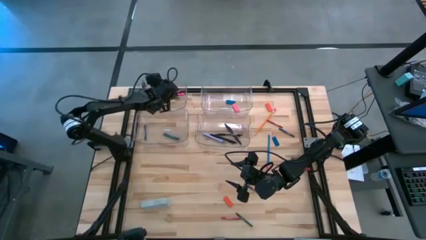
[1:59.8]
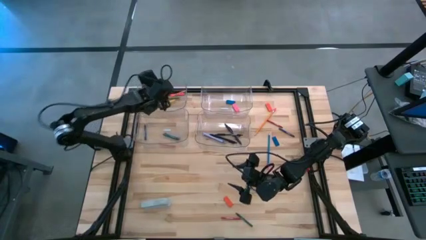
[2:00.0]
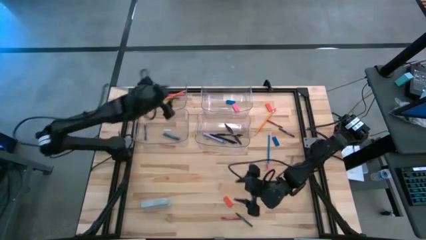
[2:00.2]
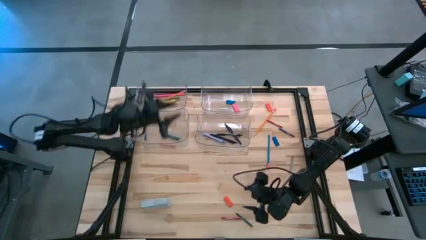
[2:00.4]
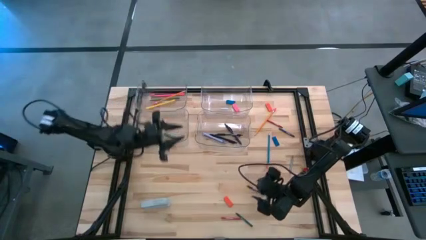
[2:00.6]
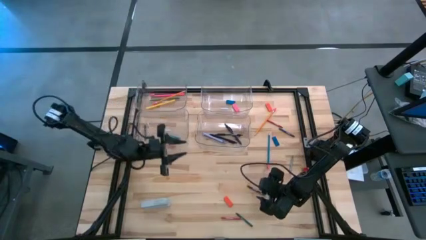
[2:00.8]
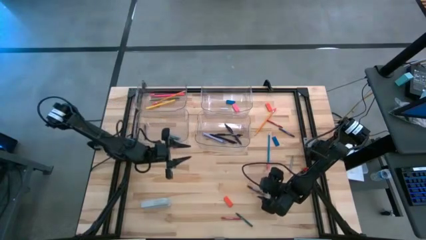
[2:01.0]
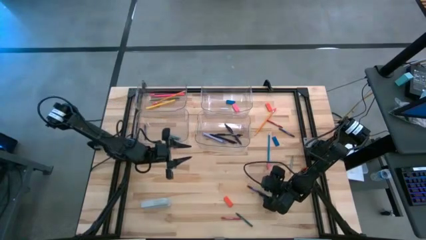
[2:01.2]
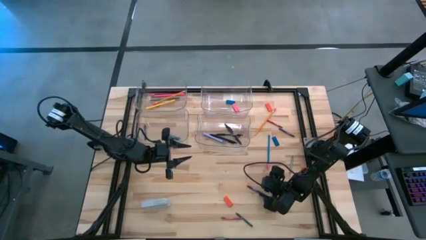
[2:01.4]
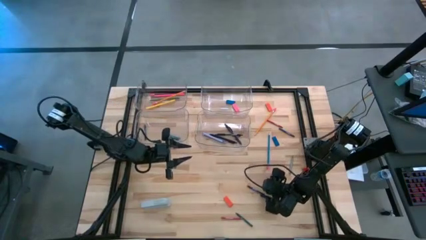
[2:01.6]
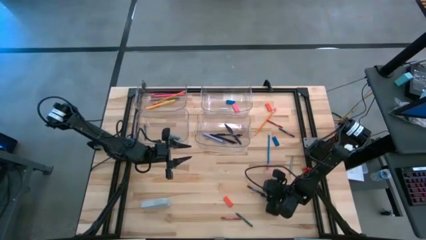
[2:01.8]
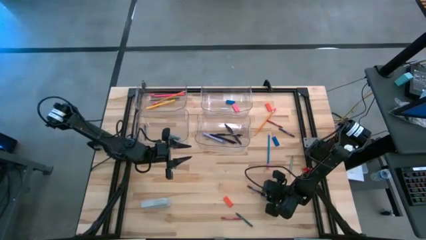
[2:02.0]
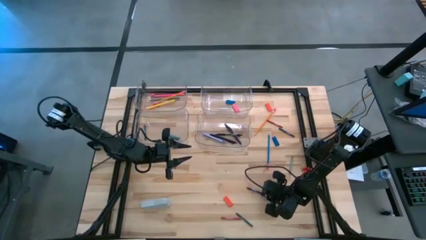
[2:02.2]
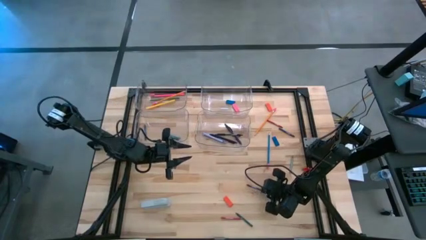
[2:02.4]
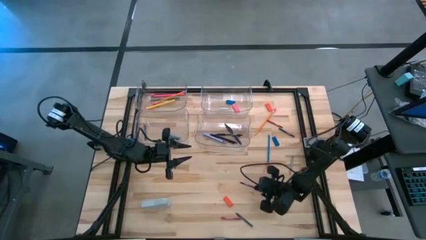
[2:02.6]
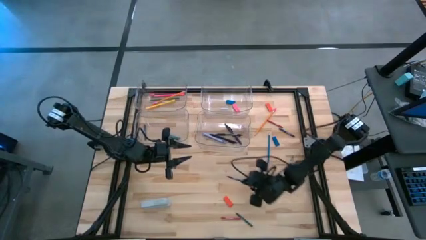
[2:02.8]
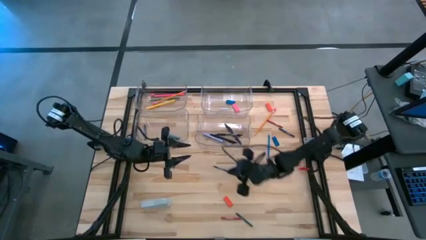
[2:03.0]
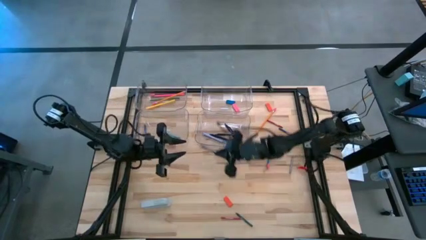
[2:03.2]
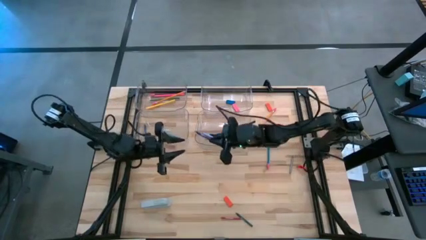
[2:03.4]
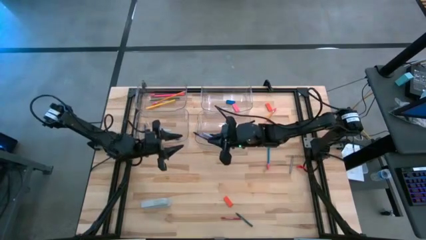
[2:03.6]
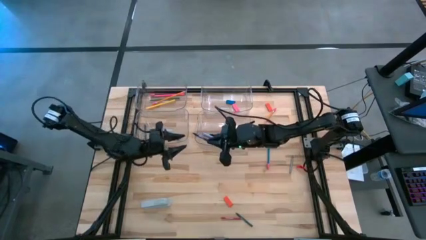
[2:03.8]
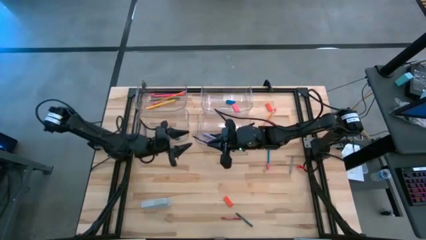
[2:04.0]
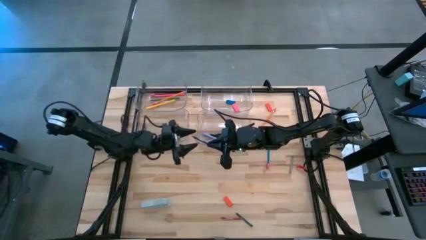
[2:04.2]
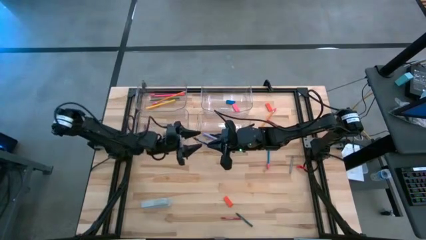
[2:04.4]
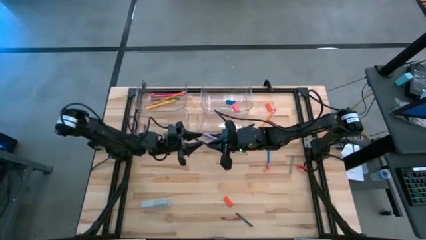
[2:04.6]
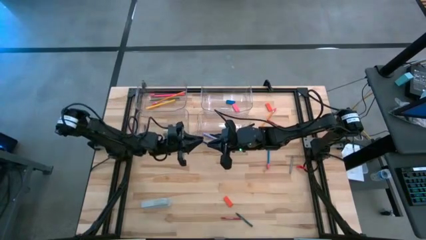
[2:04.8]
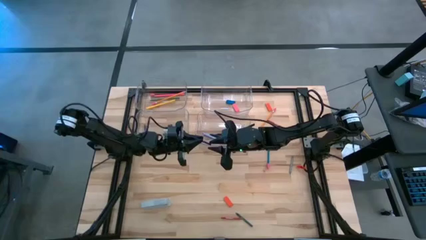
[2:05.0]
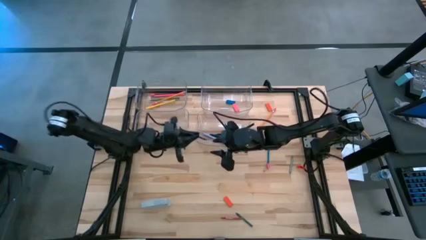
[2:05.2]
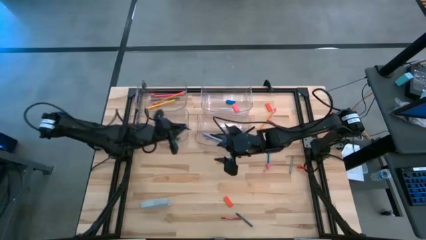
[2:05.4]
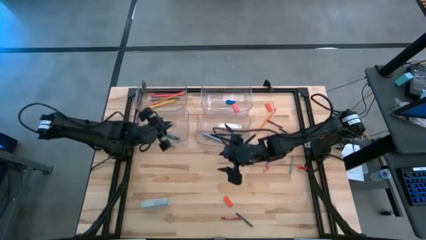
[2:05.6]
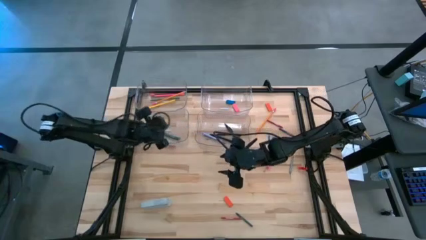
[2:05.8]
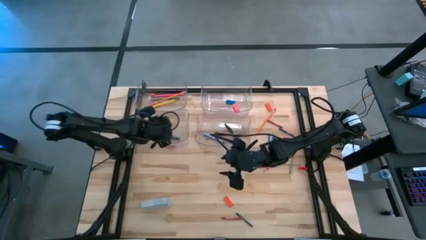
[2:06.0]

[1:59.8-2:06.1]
Task: Sort crayons/erasers/pens/pencils in bins
Put the bottom blue crayon into the bottom left transparent bin

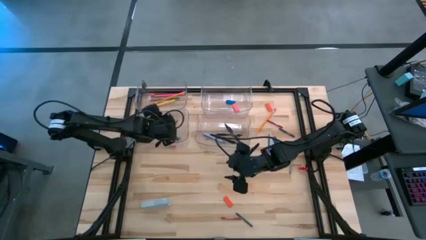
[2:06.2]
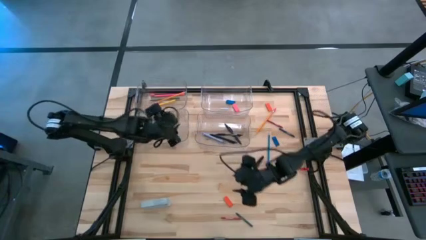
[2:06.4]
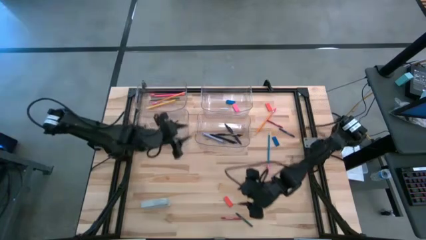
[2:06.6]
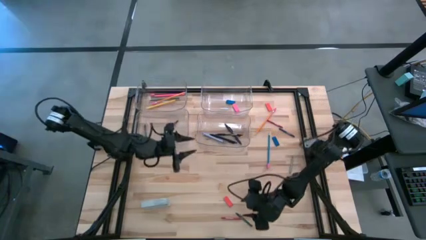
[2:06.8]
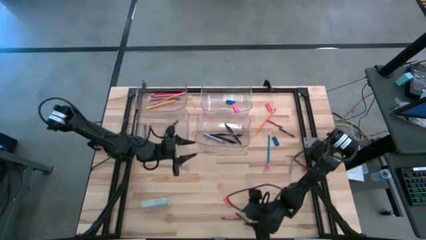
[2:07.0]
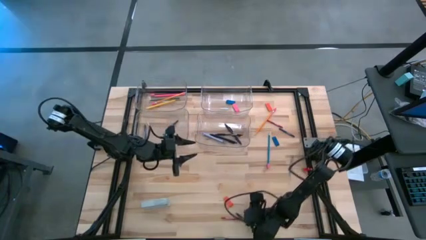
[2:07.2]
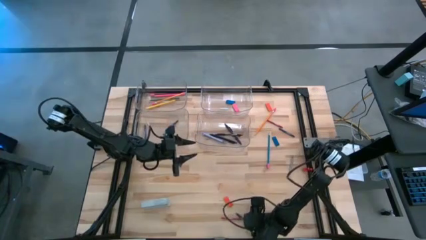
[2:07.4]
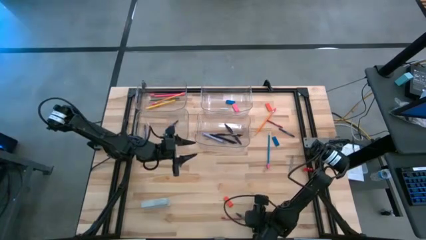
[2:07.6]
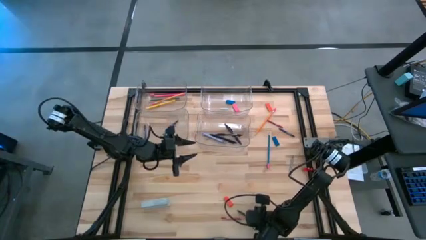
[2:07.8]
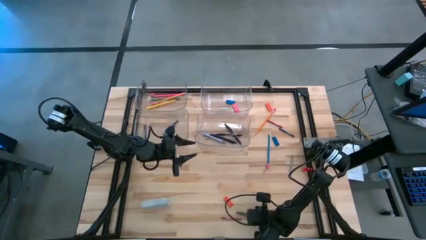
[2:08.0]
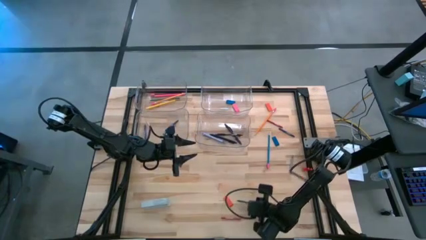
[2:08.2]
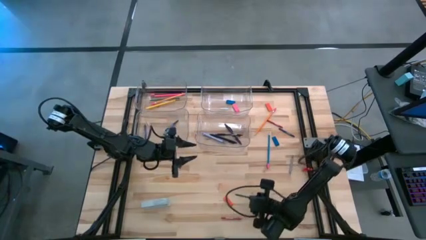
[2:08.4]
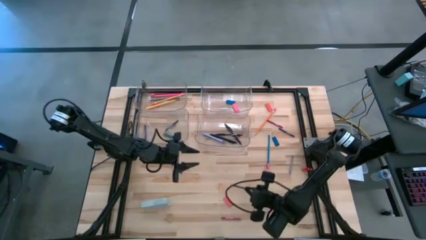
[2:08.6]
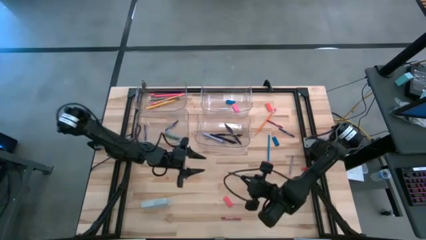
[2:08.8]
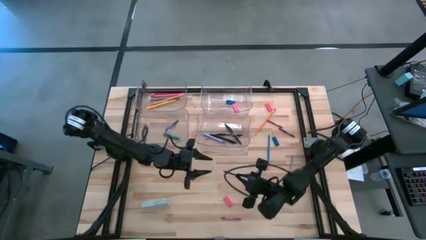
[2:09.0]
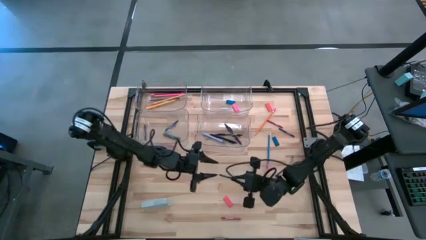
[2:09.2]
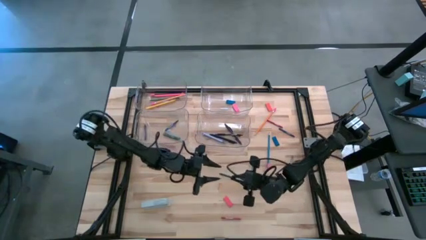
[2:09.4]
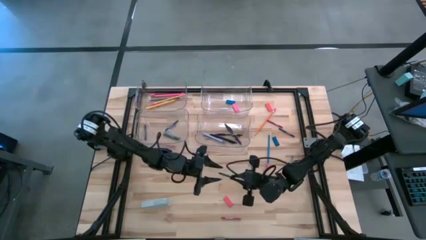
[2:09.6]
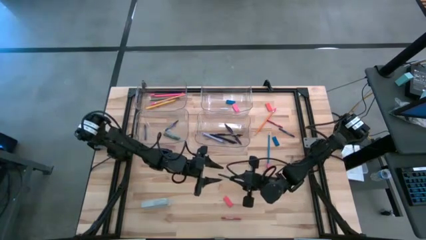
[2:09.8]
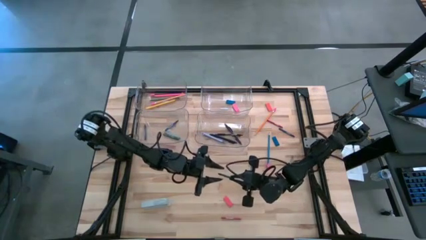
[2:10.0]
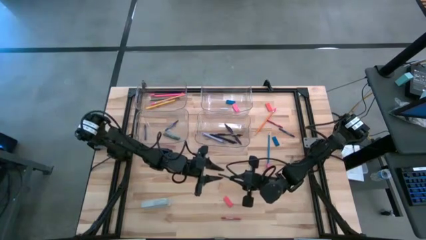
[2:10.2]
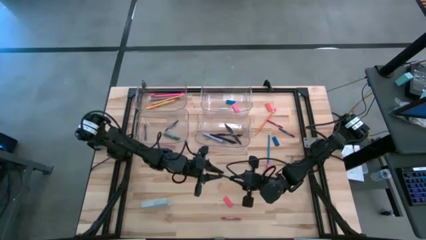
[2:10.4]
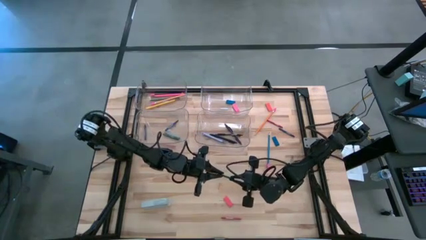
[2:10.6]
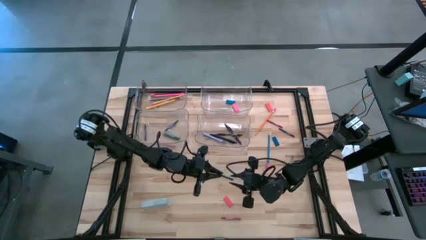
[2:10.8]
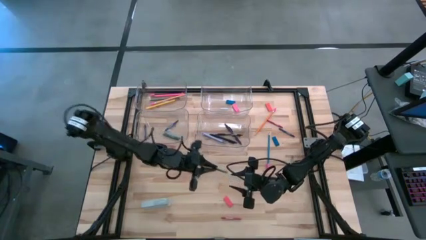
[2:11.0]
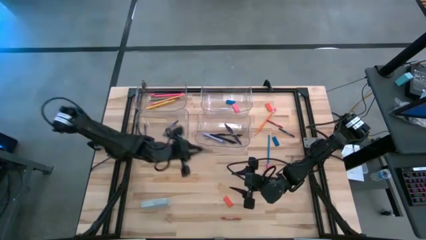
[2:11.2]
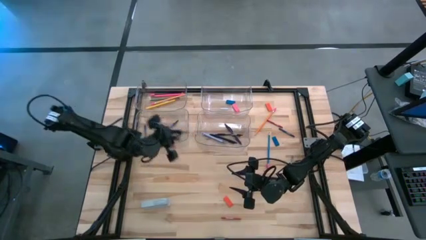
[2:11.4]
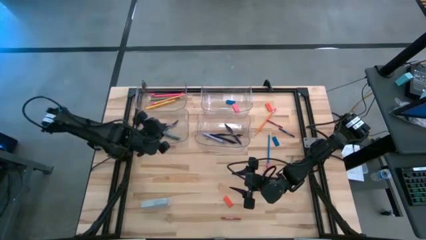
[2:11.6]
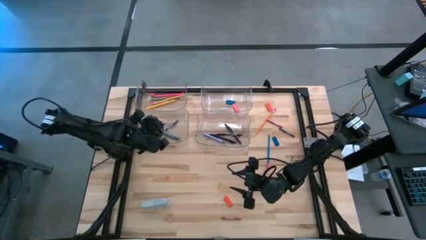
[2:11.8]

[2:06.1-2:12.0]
Put the green crayon into the bottom left transparent bin

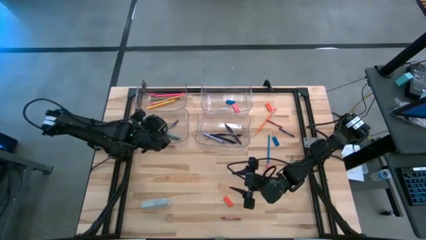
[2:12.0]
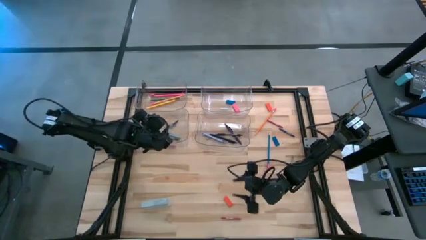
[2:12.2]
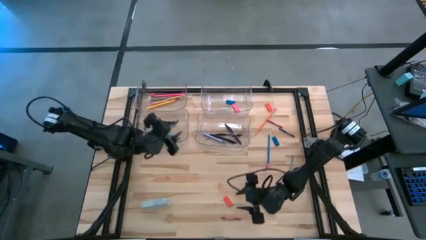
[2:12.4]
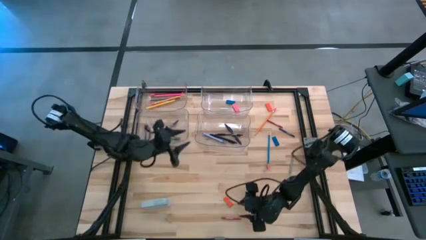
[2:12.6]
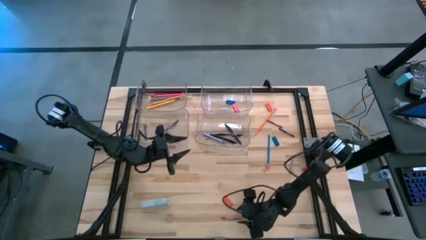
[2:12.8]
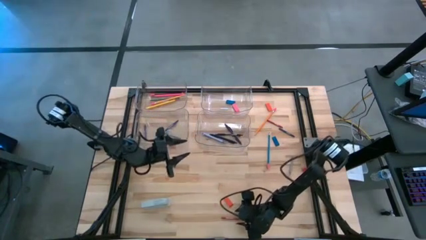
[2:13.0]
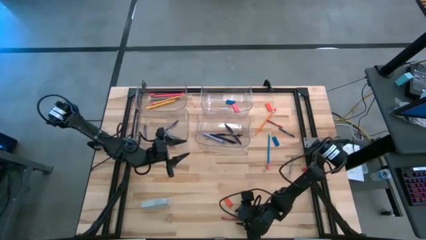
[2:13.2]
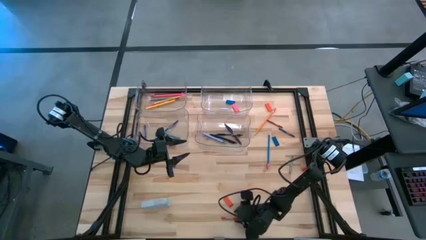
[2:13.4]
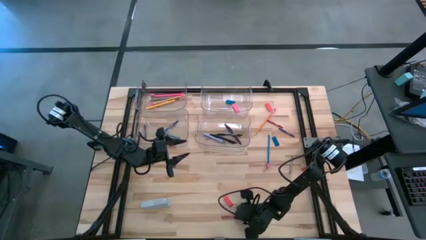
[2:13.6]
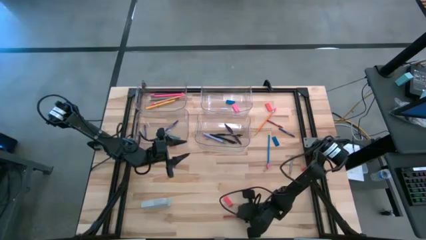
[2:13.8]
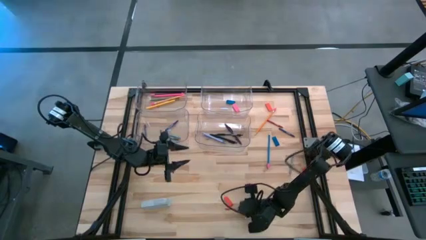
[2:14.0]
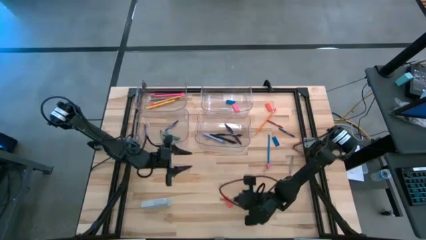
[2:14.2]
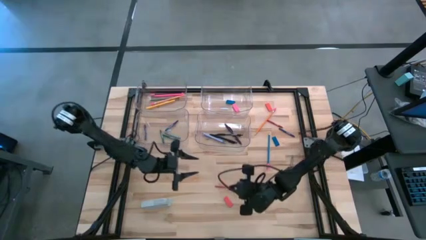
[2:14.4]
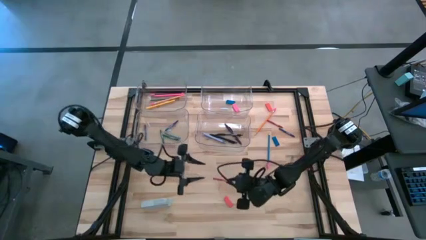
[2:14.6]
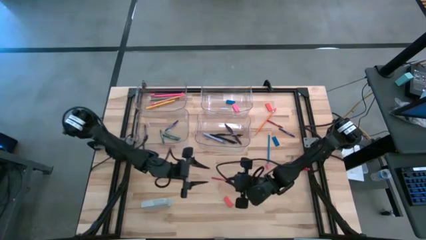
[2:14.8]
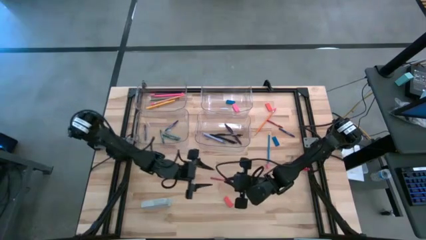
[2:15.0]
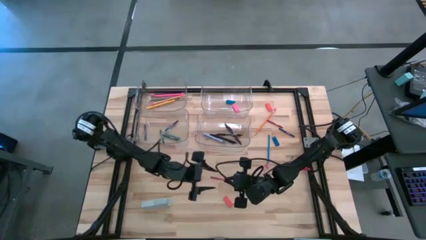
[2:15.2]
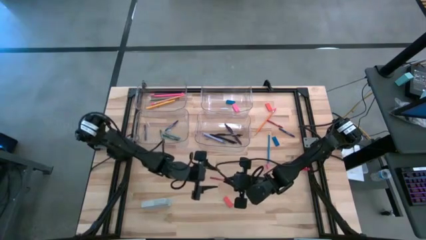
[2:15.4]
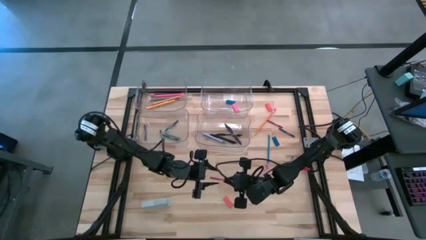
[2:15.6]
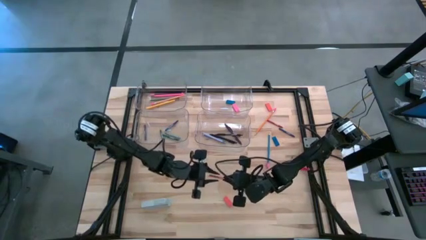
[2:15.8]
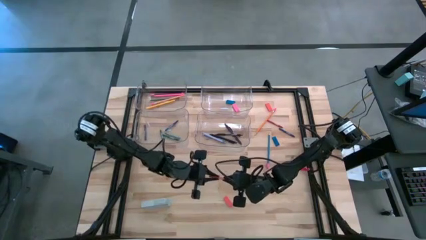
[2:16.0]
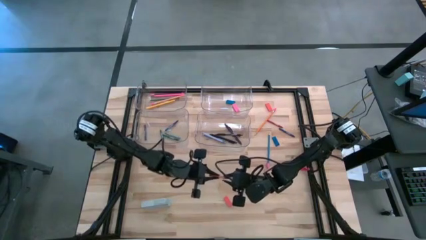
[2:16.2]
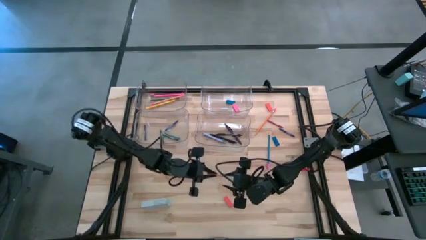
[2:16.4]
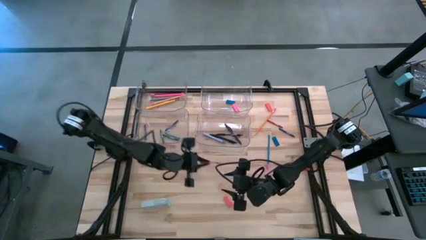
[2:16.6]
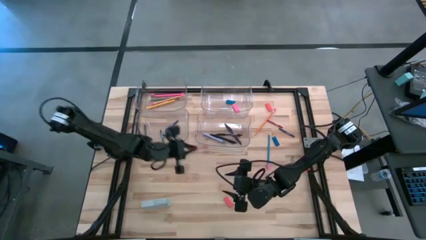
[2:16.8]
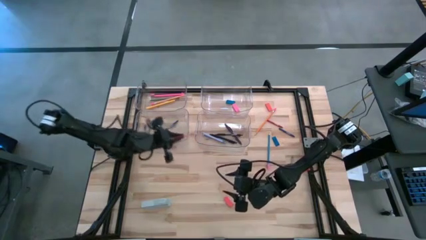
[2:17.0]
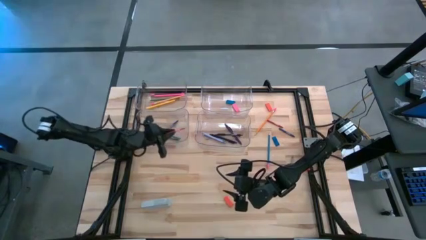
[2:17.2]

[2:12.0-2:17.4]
Put the bottom red crayon into the bottom left transparent bin
